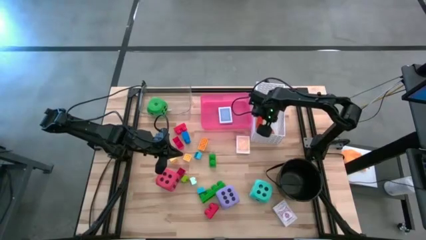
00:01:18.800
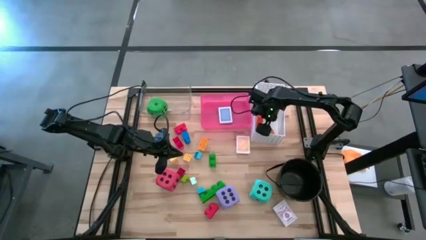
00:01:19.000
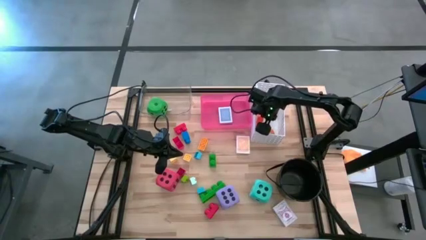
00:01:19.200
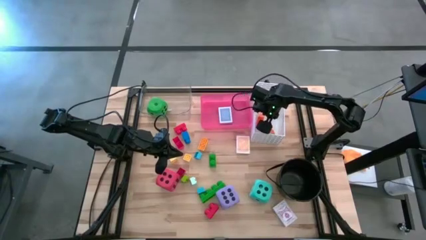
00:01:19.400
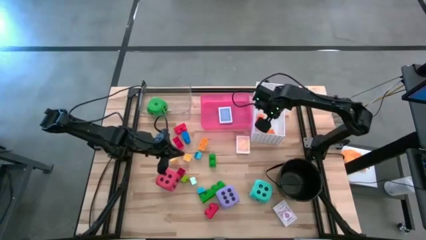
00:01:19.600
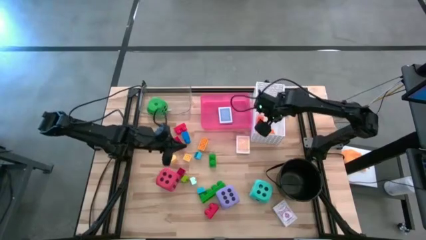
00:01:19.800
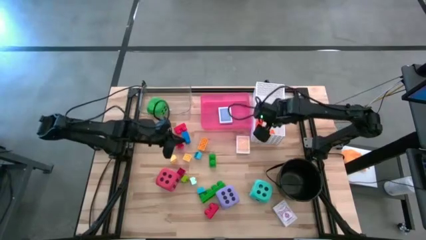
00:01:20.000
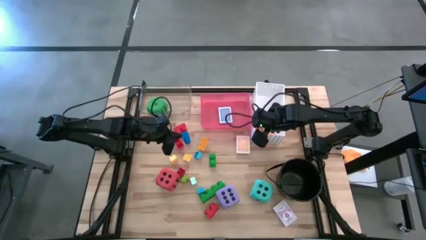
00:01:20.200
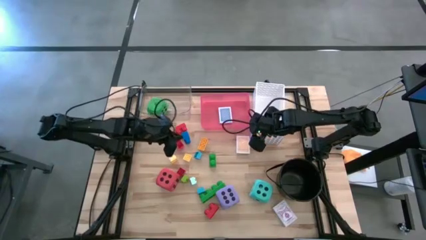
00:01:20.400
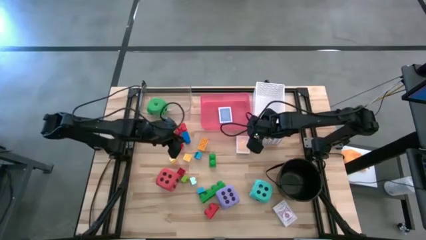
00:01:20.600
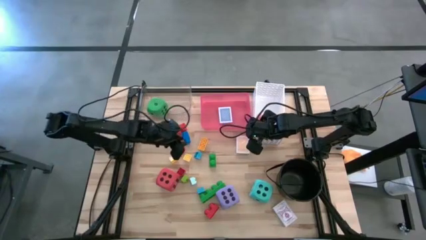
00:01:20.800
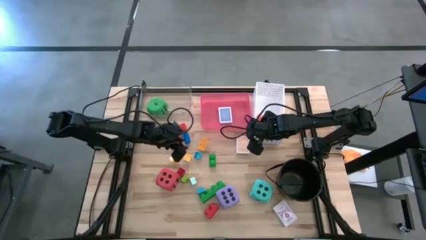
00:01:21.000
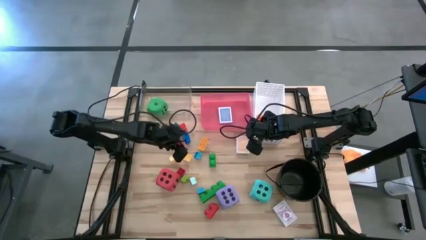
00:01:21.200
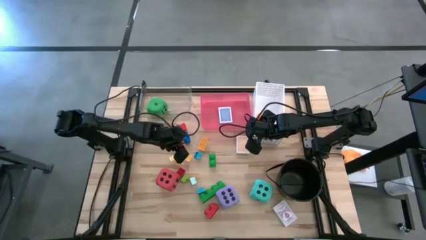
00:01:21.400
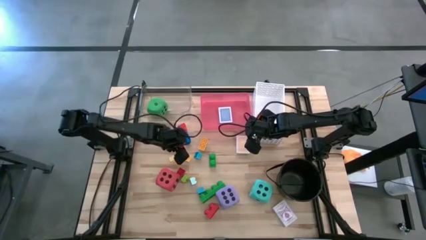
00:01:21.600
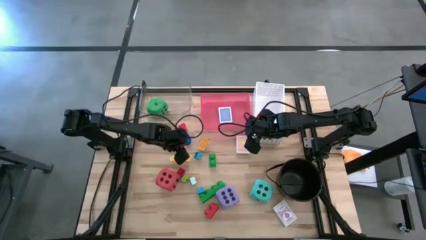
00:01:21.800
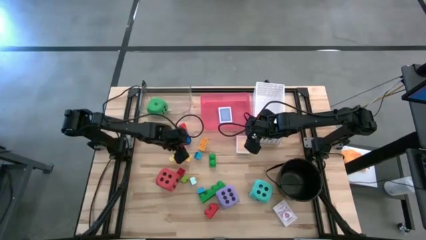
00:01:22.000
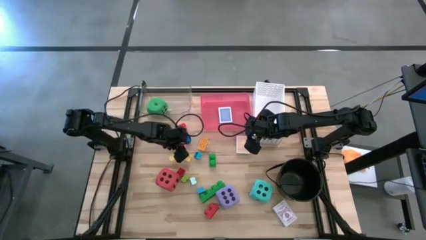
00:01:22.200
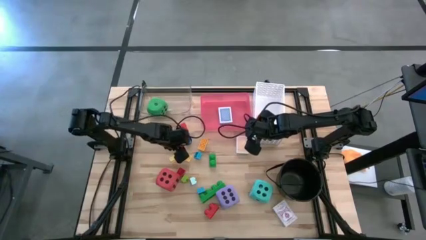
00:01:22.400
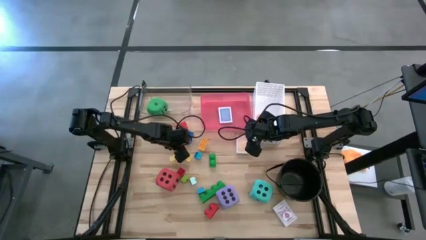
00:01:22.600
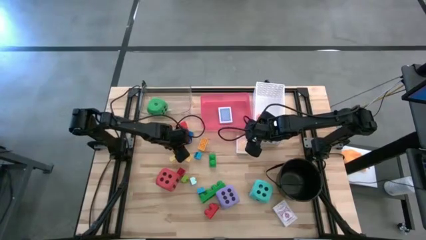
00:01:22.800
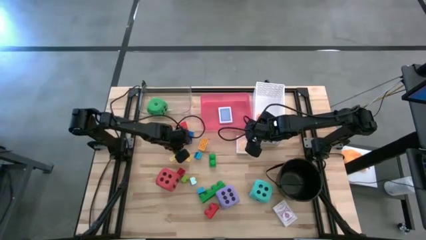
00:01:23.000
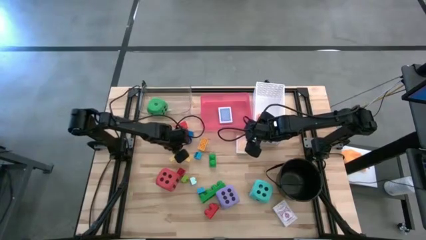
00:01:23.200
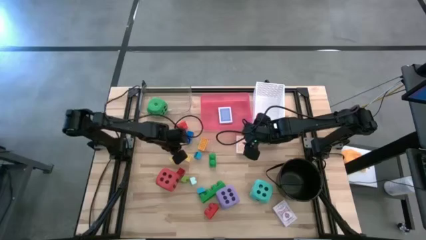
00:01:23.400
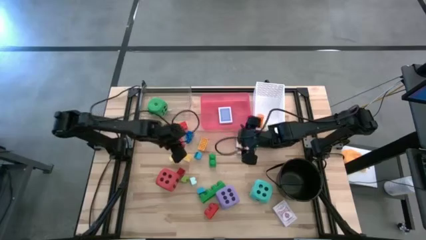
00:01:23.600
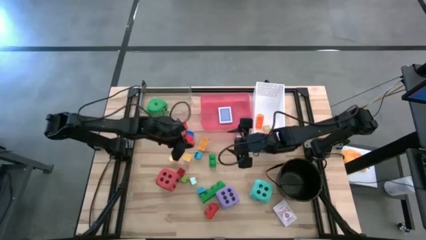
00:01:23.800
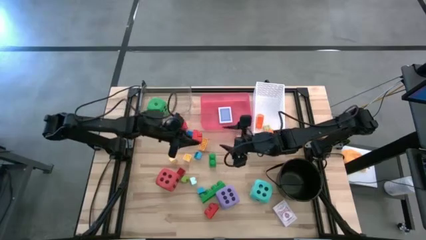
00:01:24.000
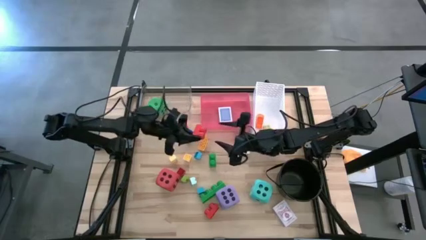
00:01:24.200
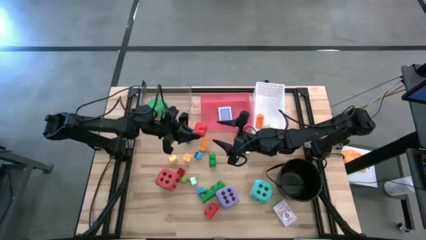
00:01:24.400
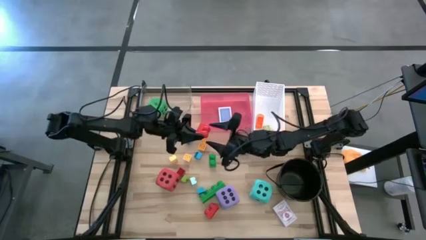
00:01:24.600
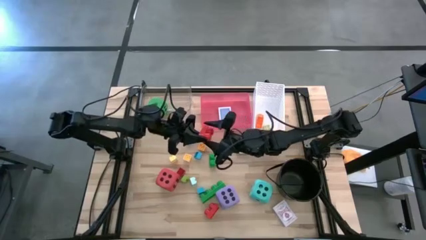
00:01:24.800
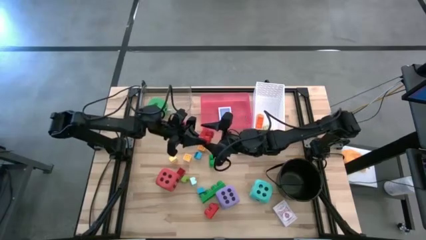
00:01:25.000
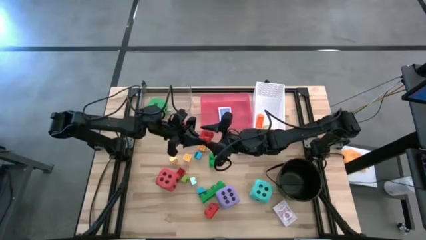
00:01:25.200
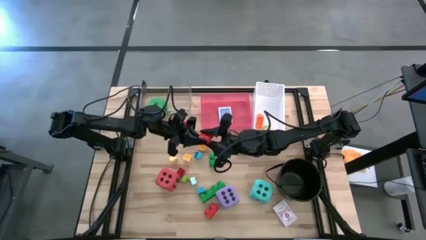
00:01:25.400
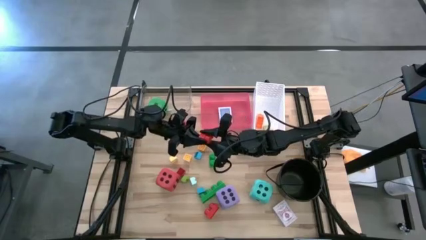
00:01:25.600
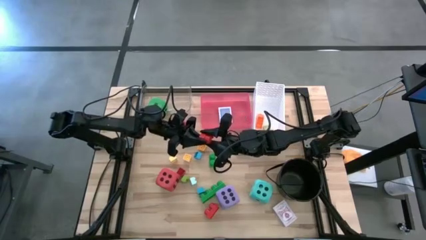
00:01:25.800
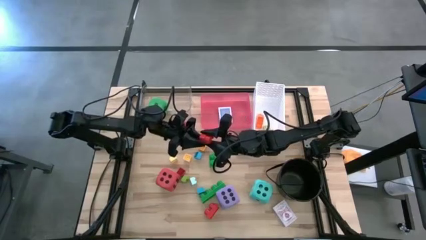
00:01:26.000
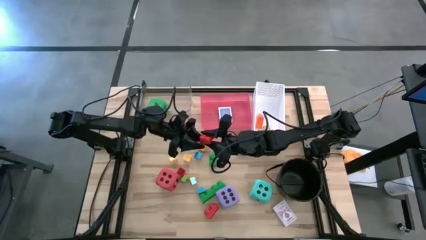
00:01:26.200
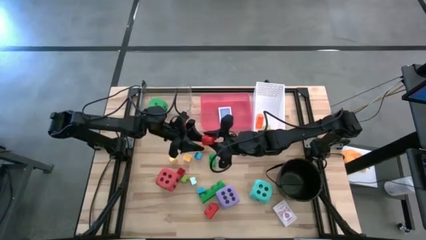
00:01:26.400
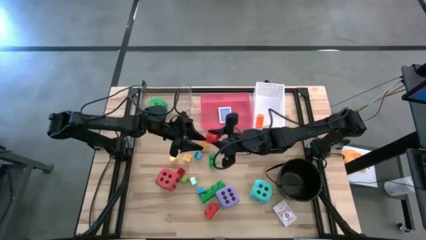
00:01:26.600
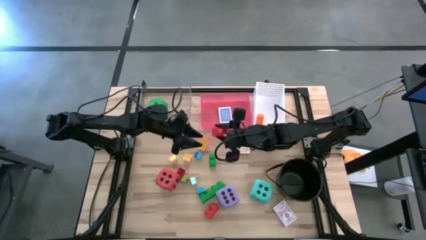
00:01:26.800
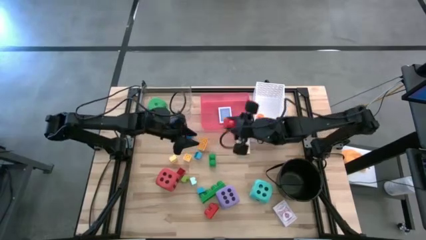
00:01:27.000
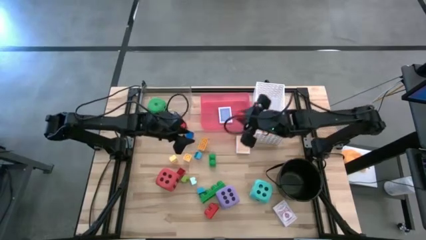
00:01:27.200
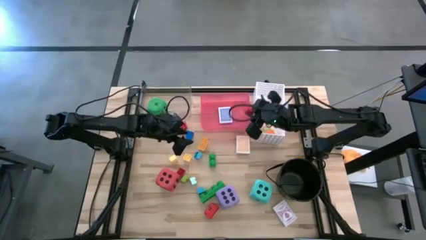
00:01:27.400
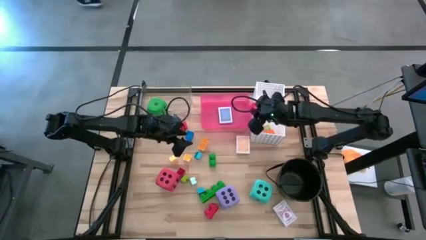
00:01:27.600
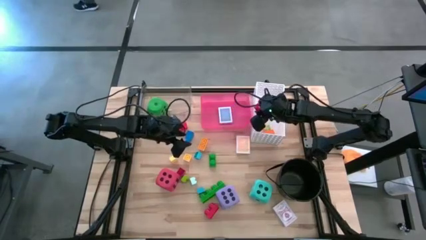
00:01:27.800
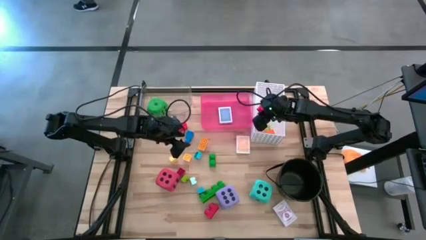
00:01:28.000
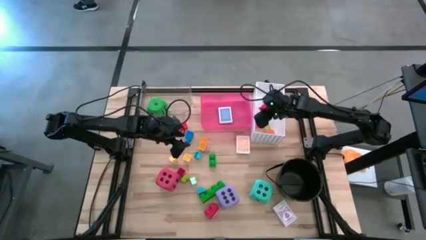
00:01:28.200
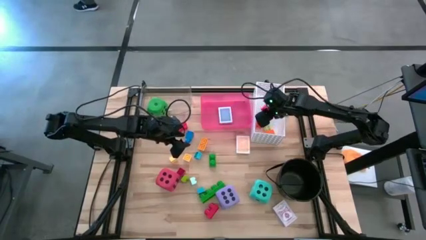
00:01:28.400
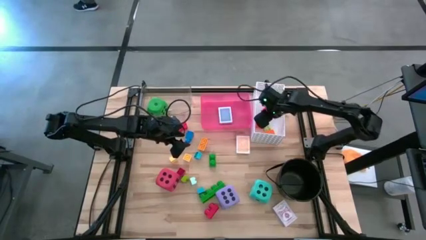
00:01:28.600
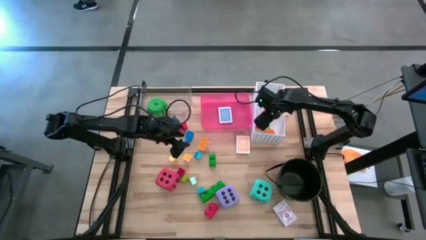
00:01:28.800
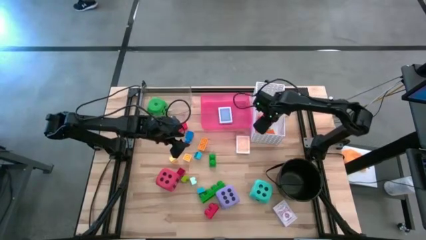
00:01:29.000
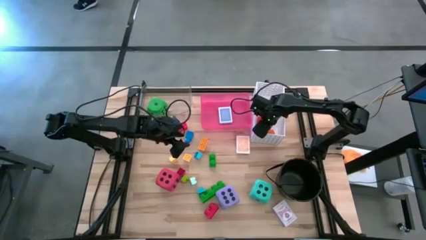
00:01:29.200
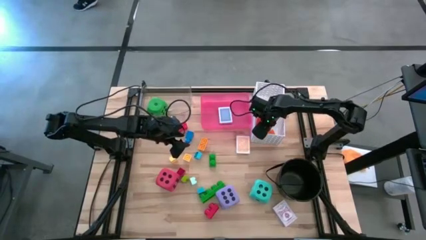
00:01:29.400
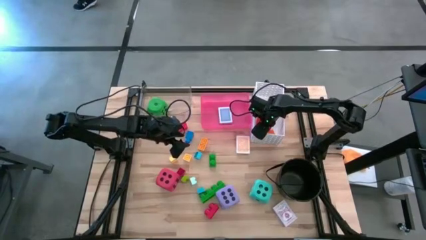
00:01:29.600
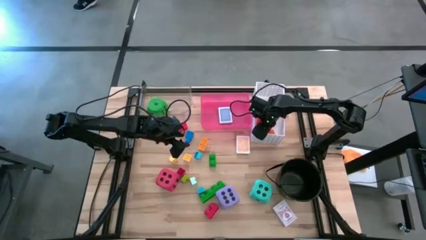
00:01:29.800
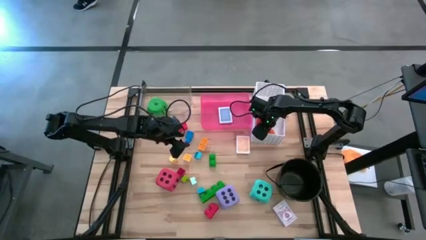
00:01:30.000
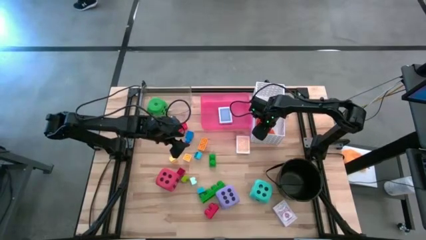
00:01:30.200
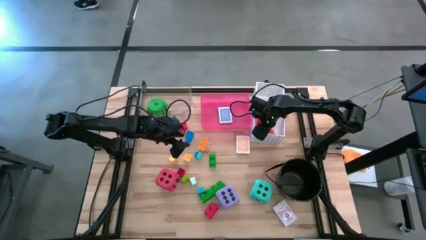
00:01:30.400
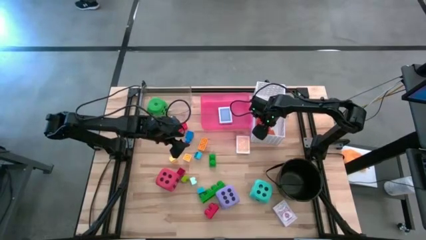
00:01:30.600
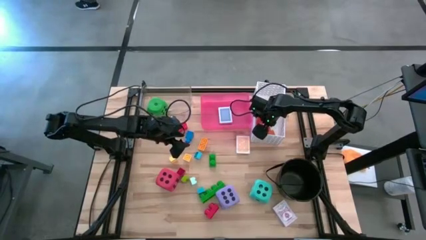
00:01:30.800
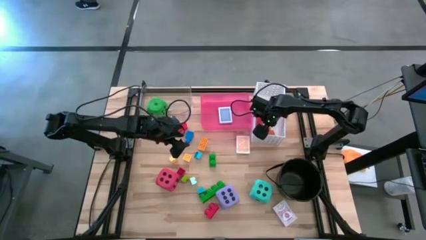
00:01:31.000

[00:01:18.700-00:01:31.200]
Task: Pick & Place Toys
Put the middle large red game piece into the white bin

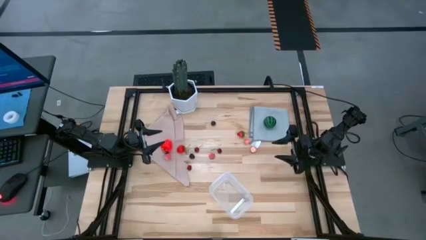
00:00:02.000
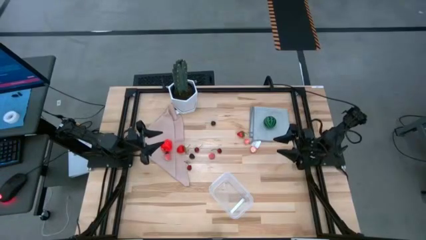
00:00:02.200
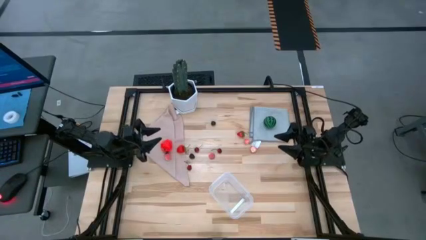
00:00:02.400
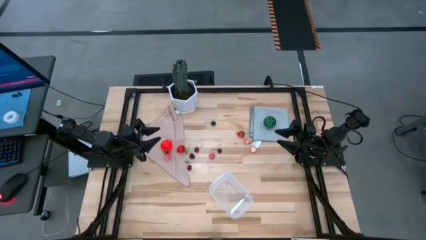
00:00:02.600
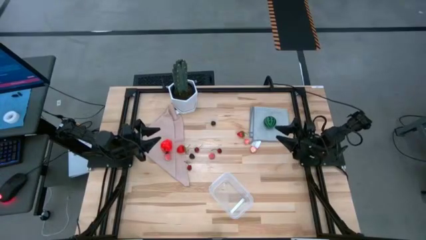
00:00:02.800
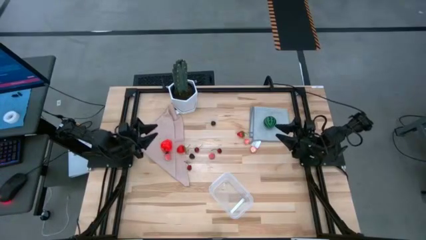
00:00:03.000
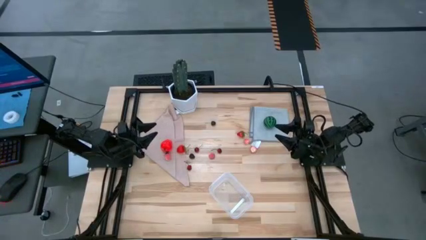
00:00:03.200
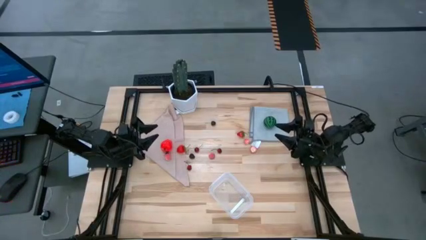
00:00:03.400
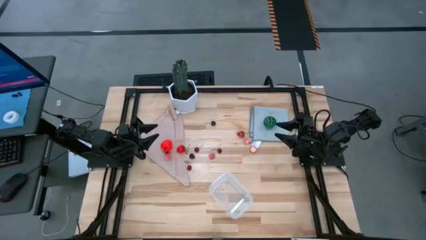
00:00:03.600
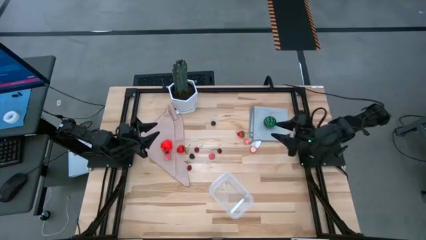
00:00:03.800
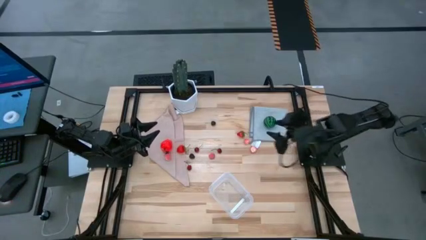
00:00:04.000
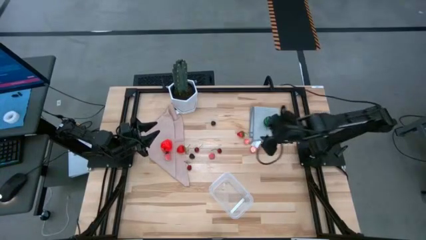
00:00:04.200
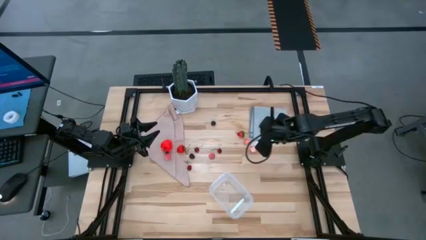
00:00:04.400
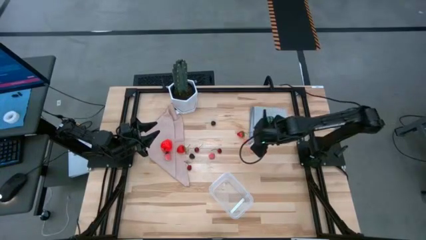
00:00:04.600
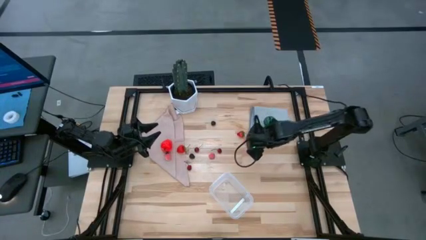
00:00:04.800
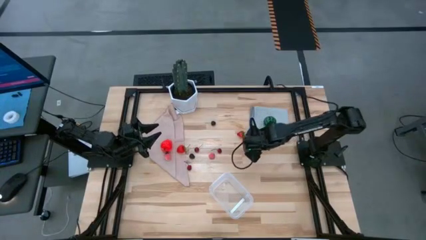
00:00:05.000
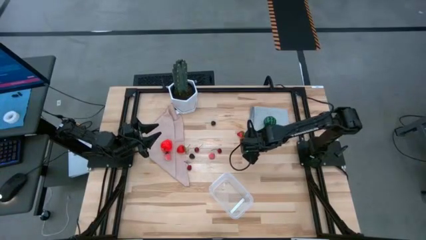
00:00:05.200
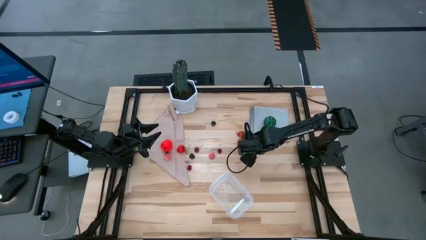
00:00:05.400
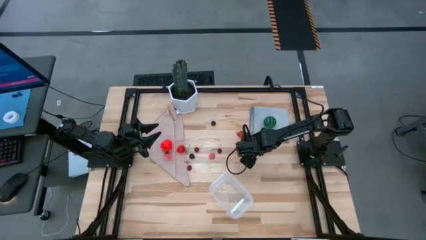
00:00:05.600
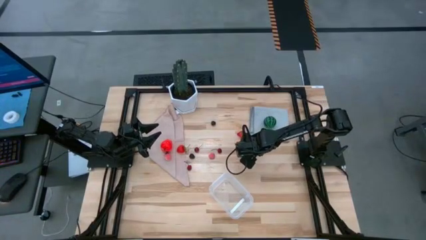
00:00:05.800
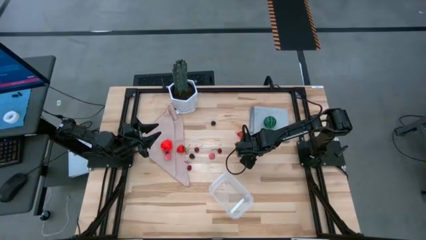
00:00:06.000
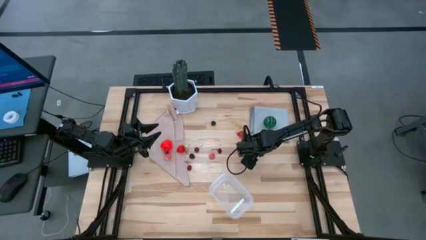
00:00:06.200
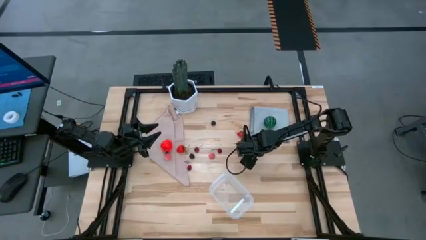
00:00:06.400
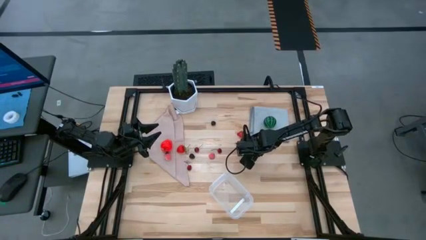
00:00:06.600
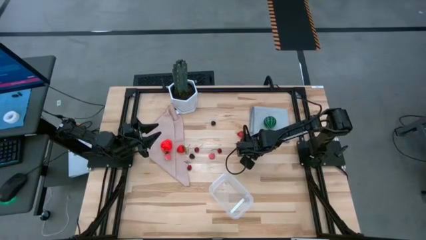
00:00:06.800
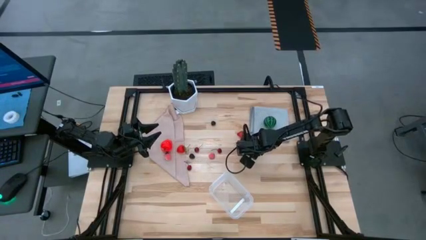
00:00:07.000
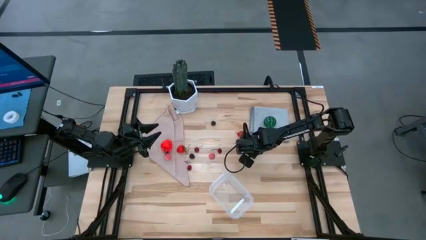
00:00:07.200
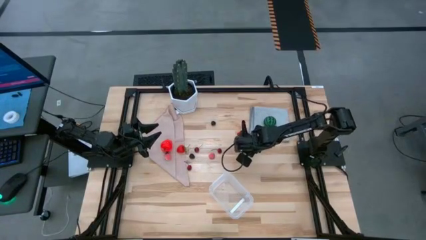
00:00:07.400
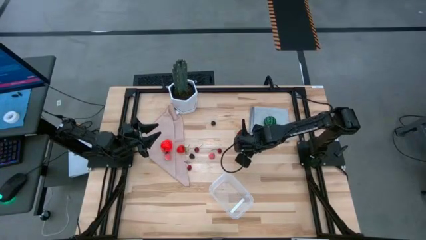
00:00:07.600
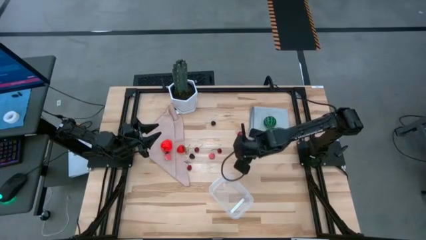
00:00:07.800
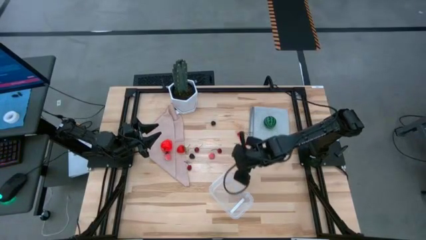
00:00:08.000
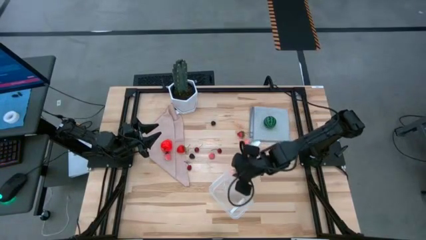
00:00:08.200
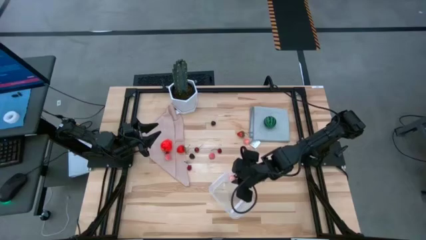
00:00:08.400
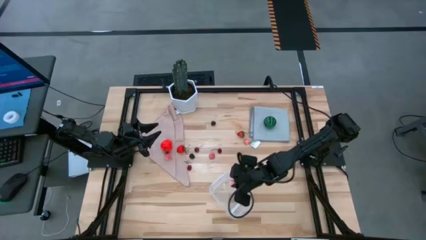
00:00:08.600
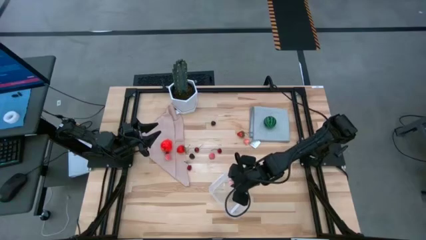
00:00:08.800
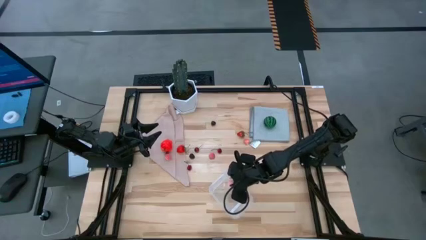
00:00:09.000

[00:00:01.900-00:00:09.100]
Task: Pick and placing Produce into tupperware
Put the middle right peach into the transparent bin
